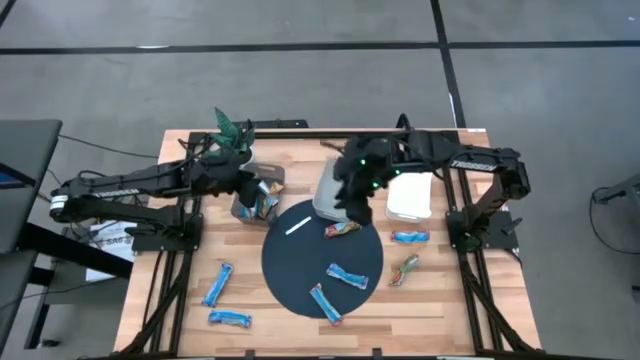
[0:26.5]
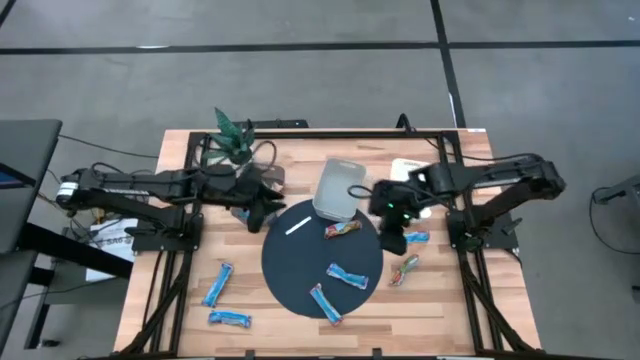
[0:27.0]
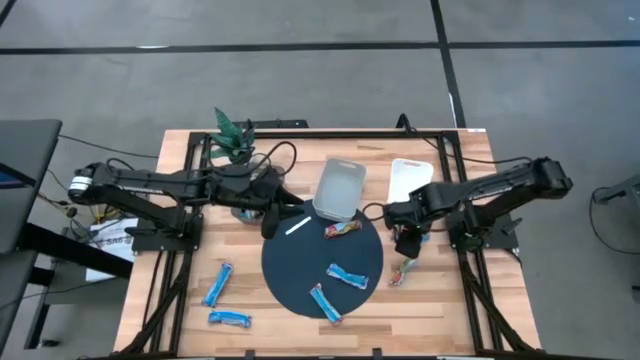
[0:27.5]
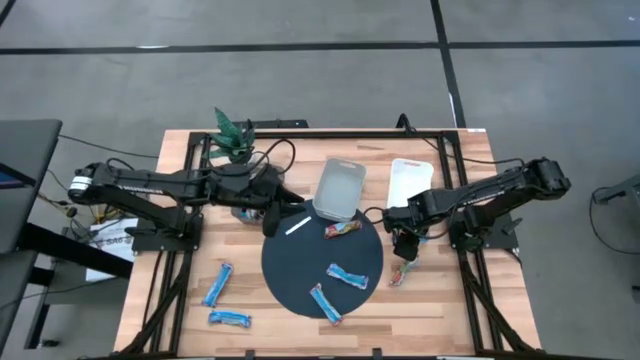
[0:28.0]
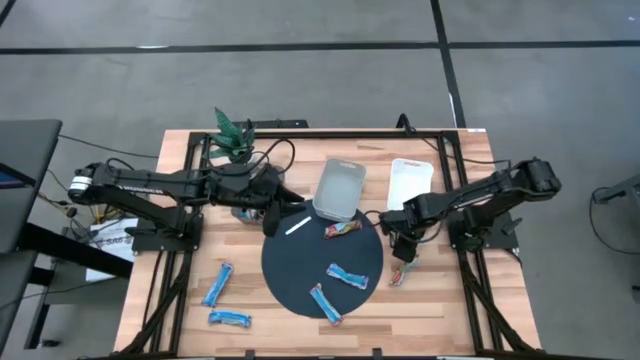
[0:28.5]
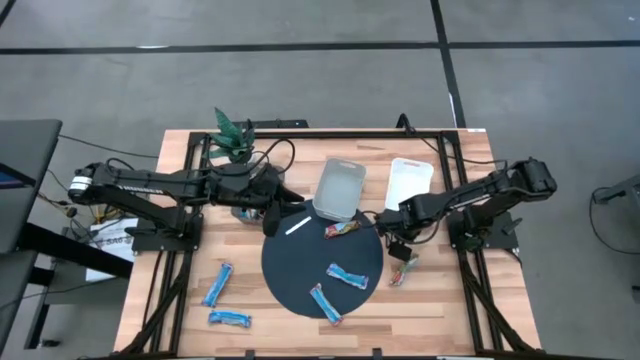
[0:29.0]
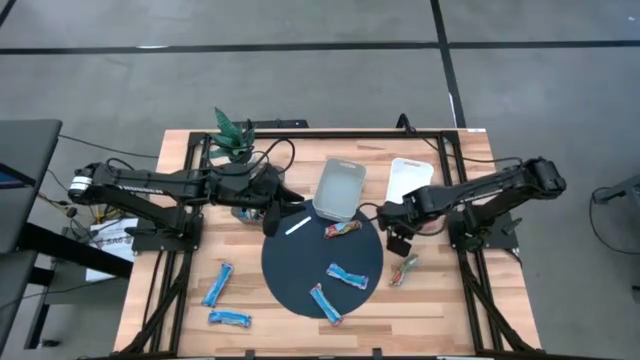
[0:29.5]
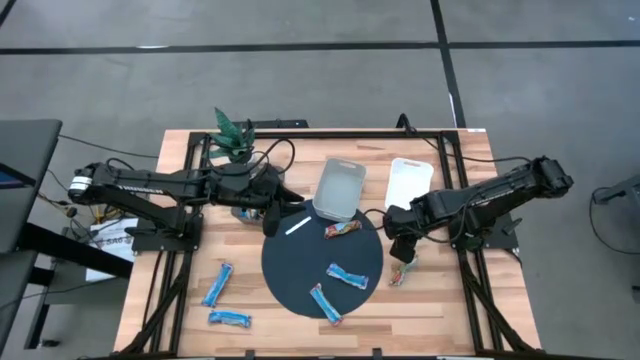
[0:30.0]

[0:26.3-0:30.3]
Task: Pick and place Granola Bars by type
Put the red granola bar into the white bin

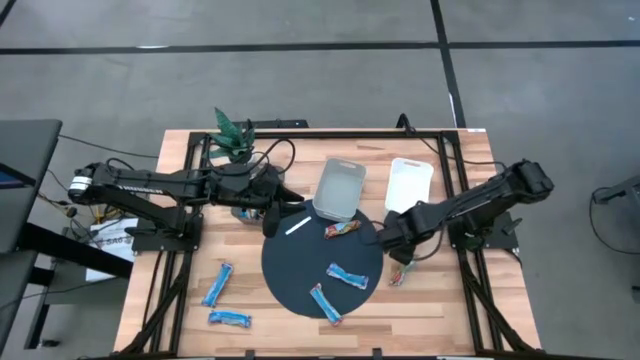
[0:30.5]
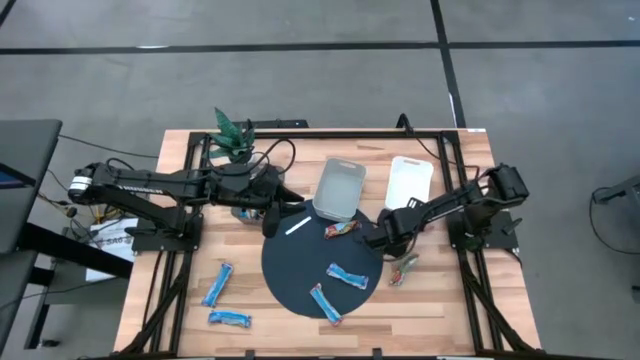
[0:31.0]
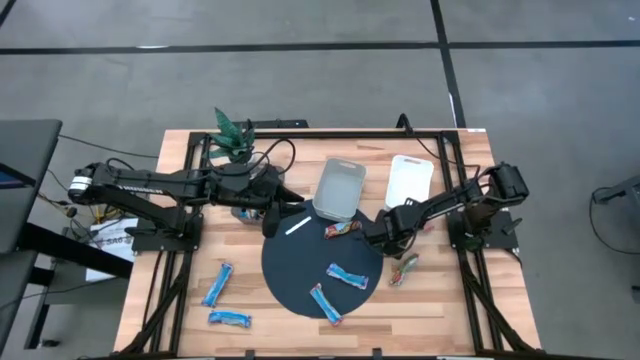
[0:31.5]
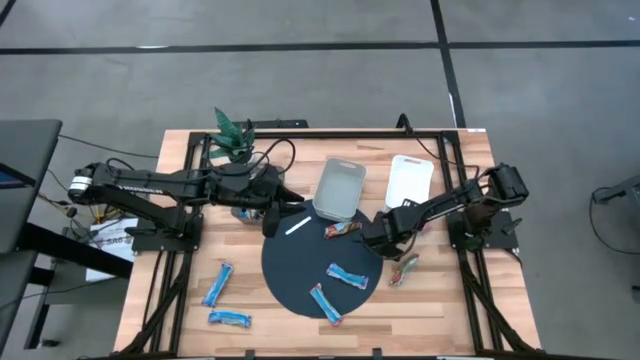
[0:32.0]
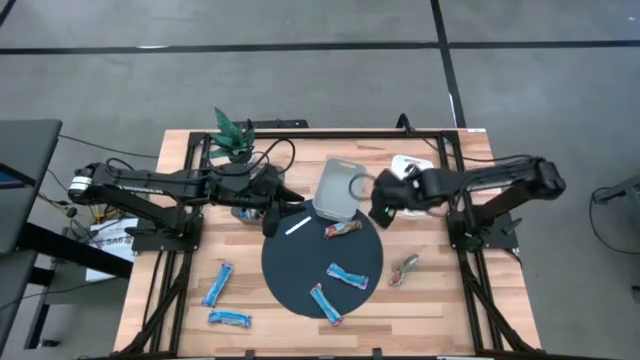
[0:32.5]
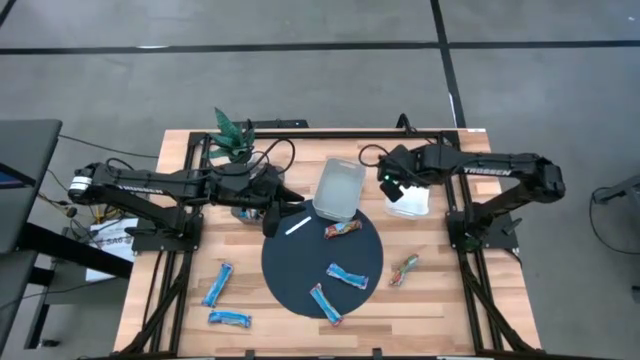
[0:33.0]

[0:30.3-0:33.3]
Put the red granola bar into the white bin

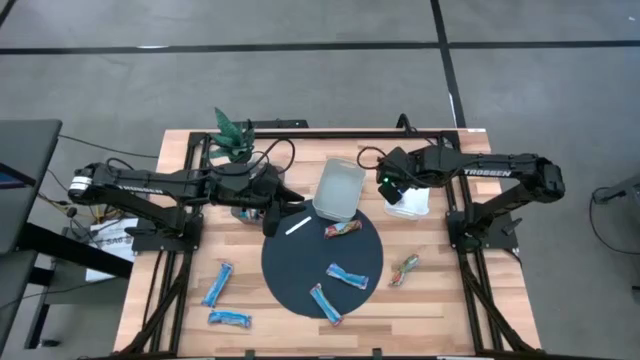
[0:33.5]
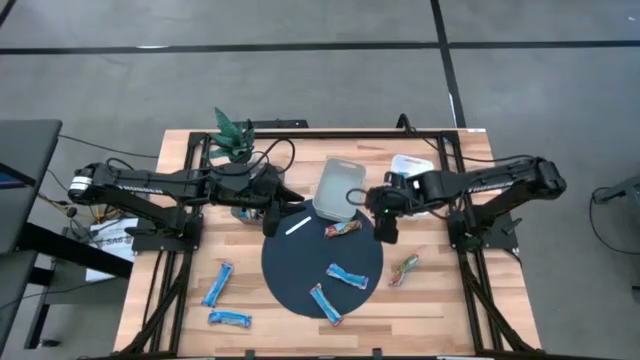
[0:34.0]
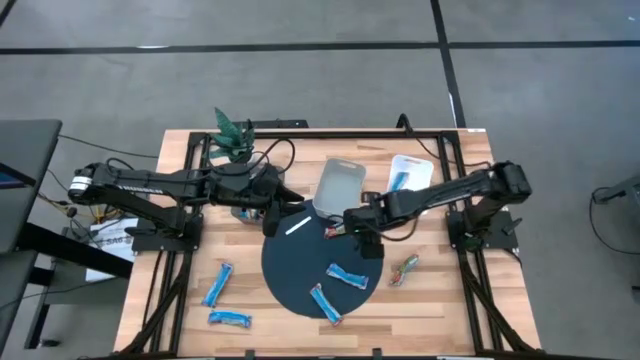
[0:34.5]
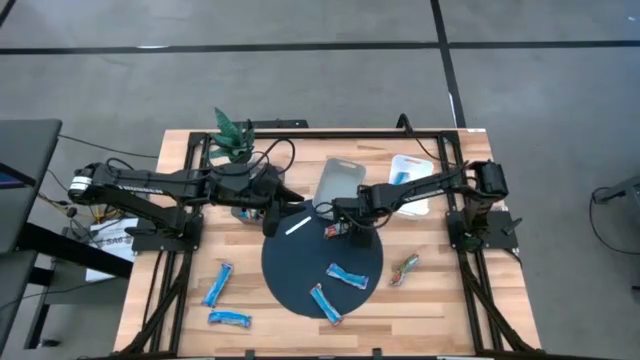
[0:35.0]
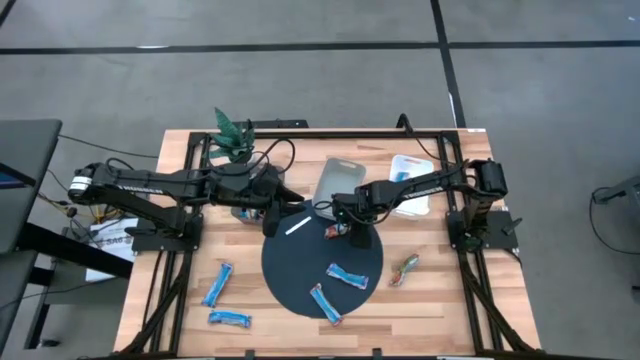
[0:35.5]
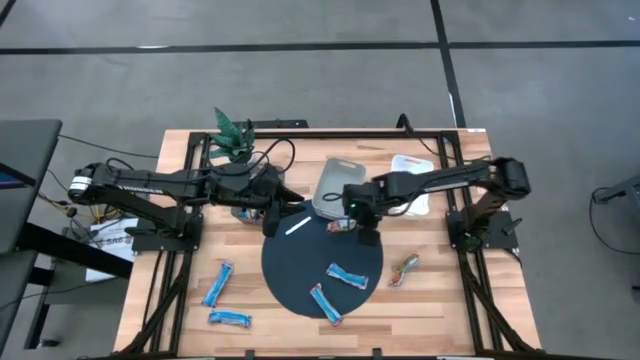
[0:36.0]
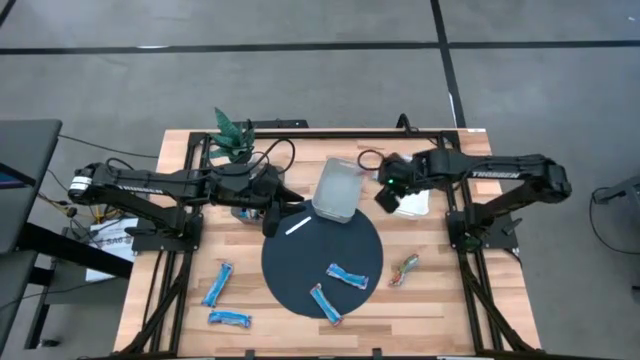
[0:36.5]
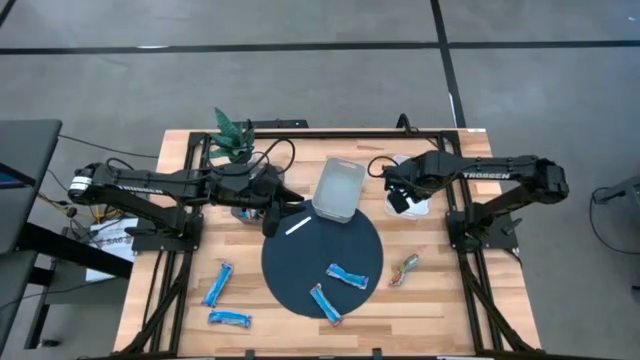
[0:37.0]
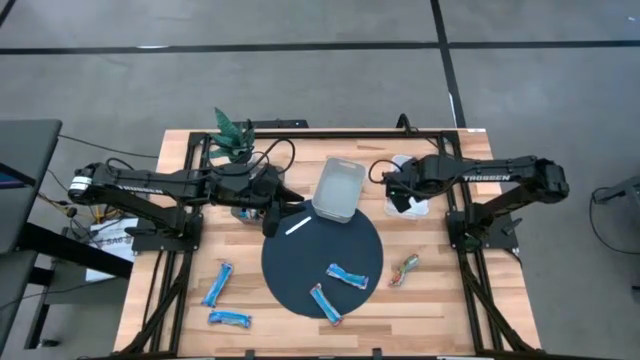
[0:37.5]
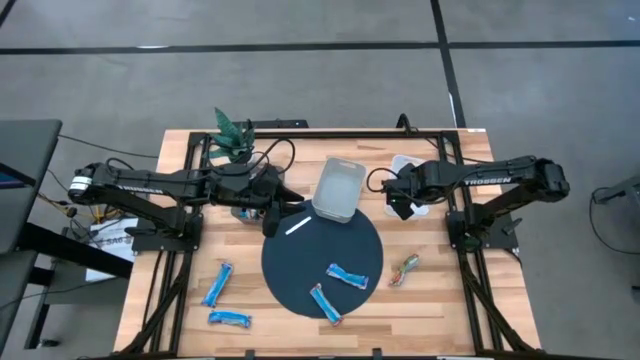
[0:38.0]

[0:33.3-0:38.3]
Put the red granola bar into the white bin

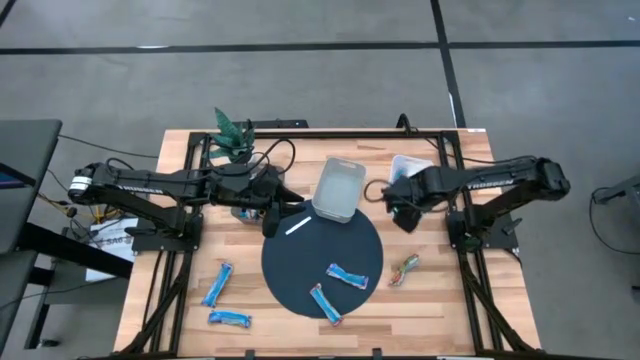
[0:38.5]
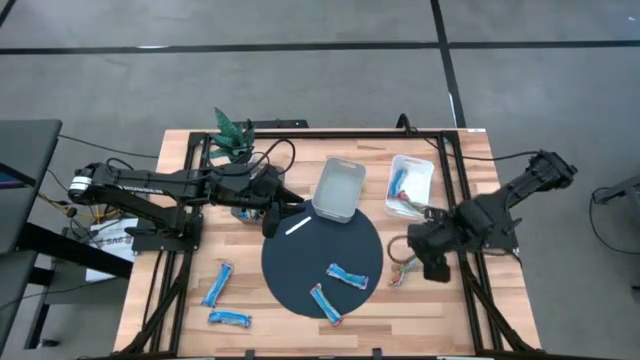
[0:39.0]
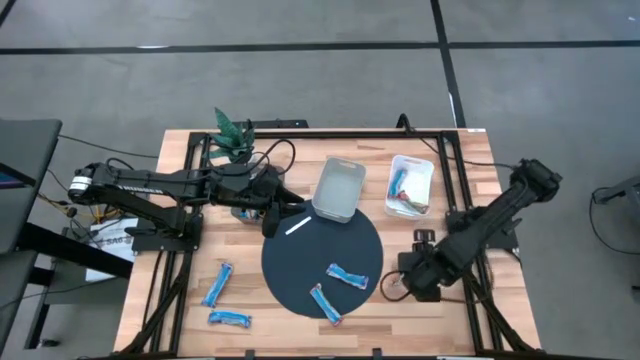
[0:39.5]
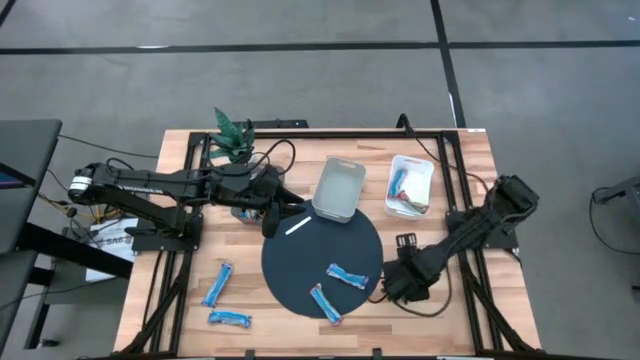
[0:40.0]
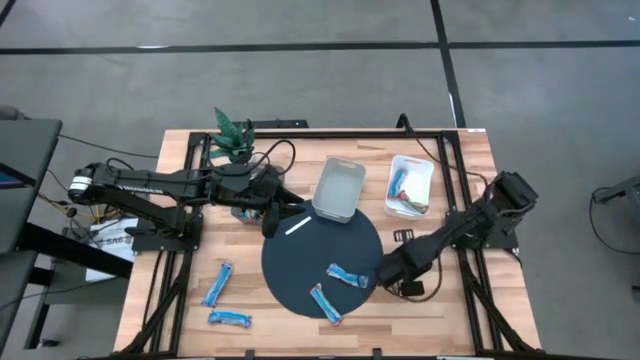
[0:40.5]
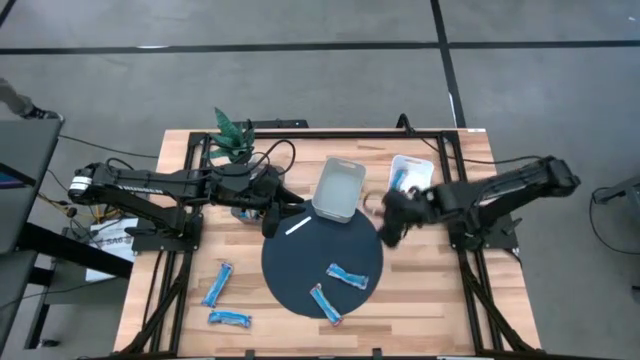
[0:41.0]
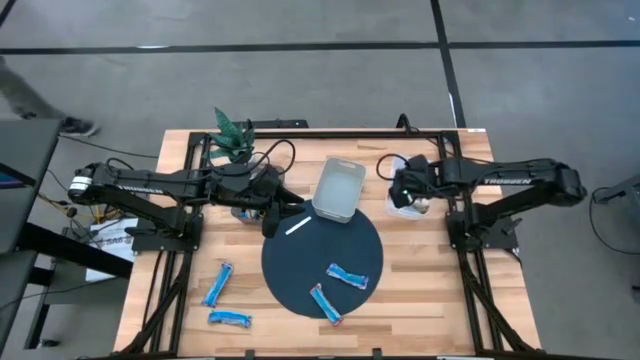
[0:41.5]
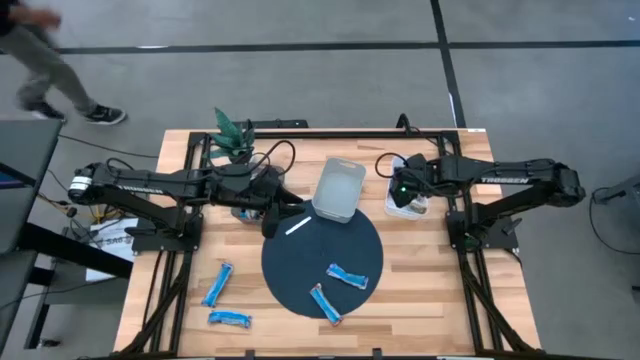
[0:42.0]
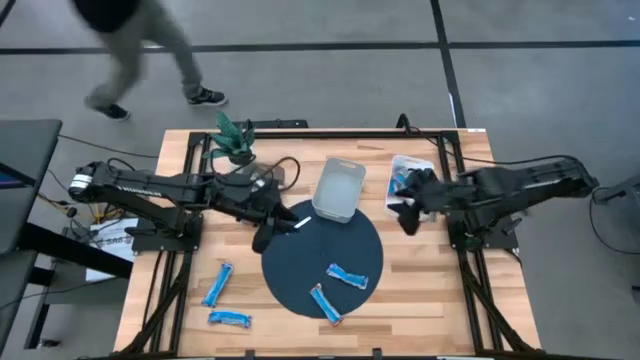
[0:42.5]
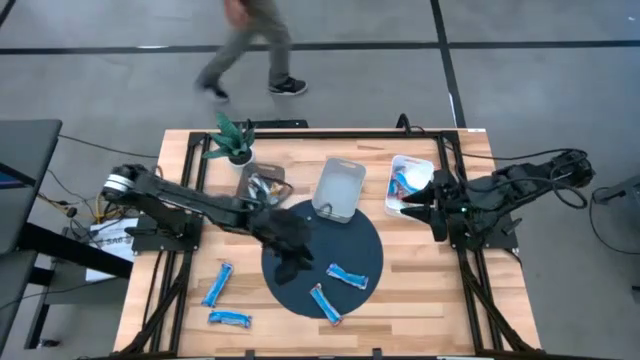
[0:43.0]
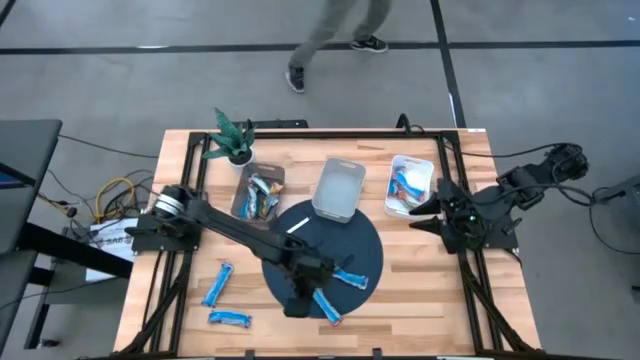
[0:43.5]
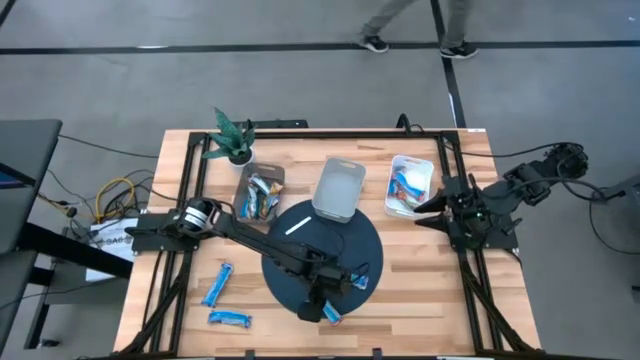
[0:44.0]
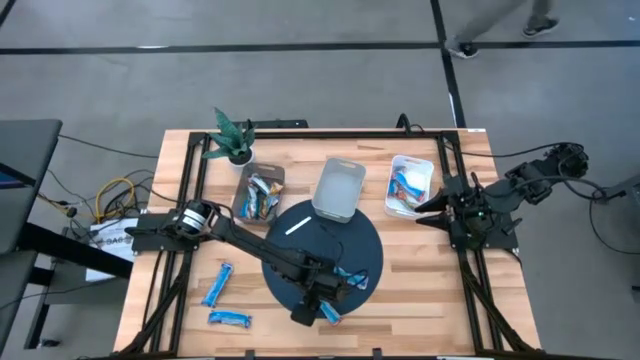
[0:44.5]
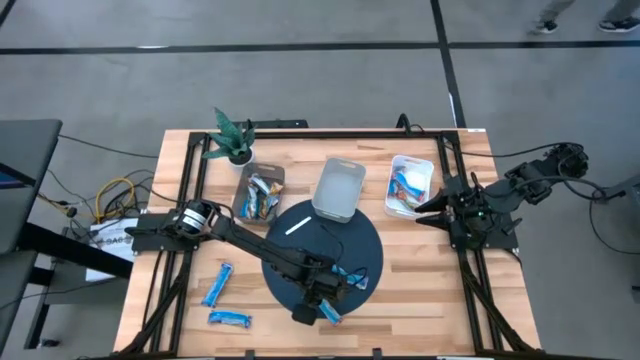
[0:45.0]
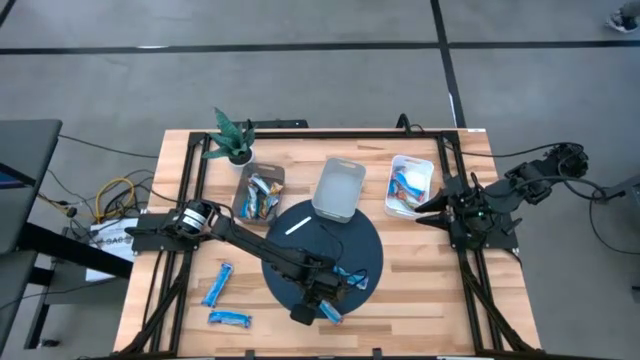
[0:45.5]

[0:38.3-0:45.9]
Put the red granola bar into the white bin

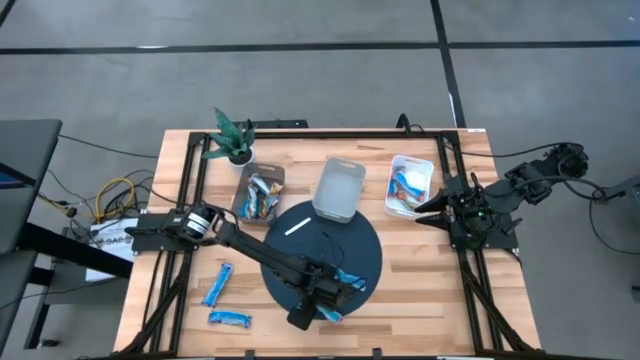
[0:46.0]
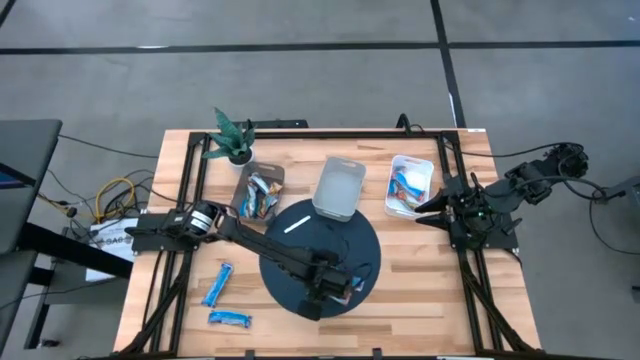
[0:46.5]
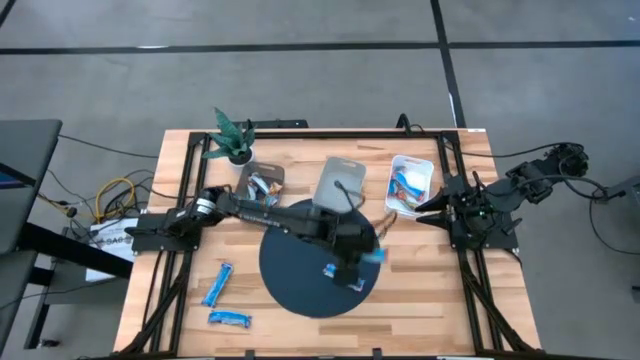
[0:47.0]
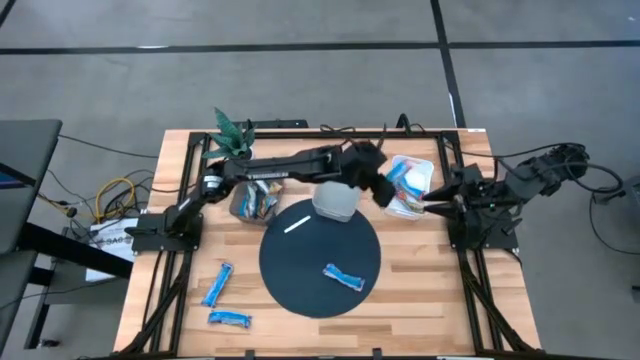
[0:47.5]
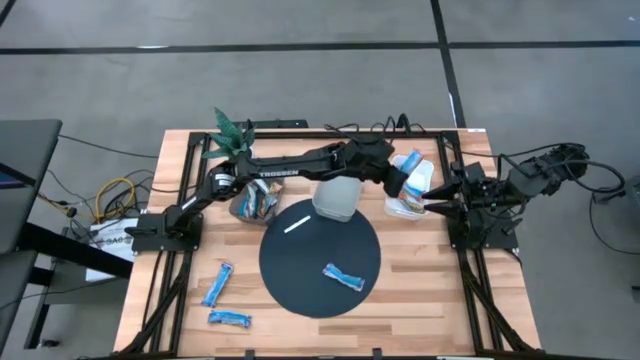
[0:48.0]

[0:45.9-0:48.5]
Put the red granola bar into the white bin
